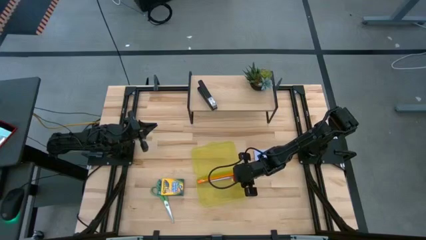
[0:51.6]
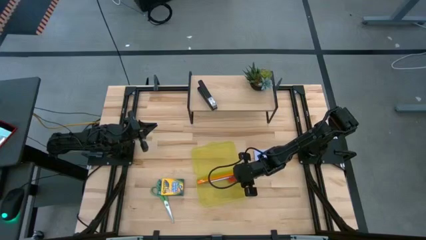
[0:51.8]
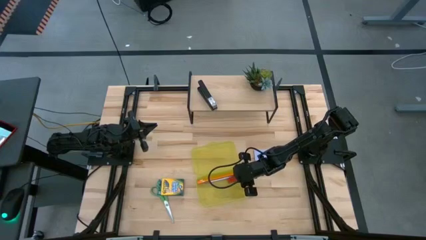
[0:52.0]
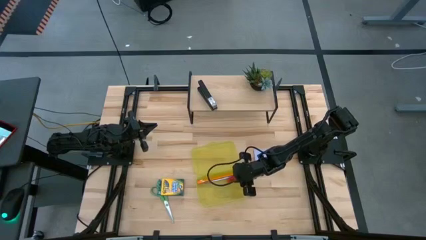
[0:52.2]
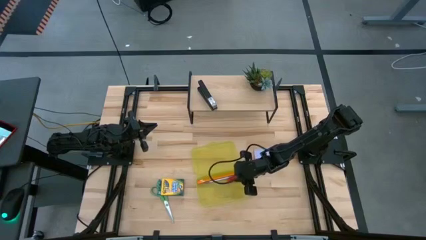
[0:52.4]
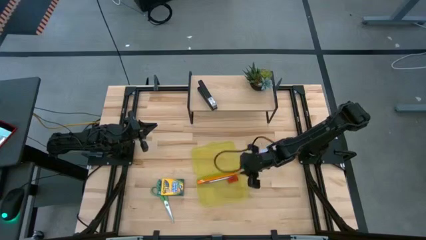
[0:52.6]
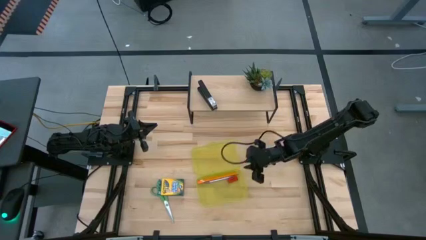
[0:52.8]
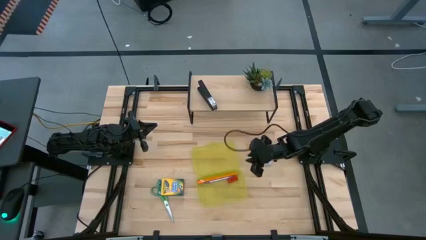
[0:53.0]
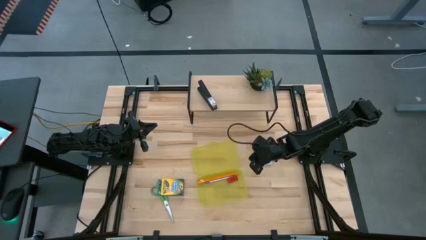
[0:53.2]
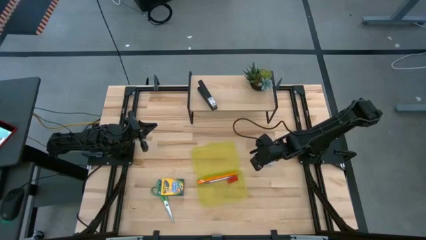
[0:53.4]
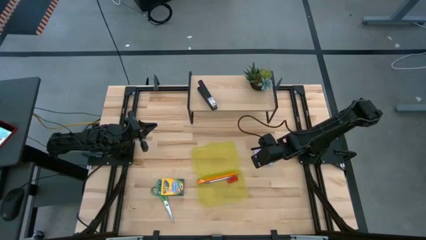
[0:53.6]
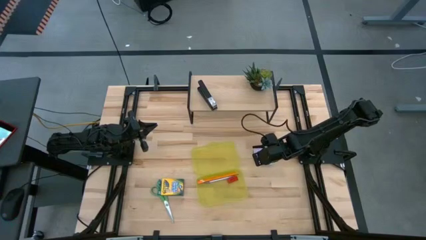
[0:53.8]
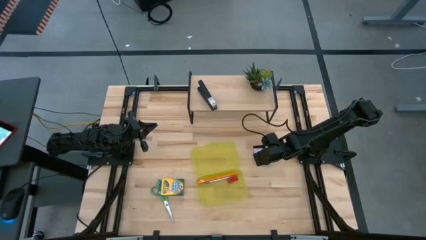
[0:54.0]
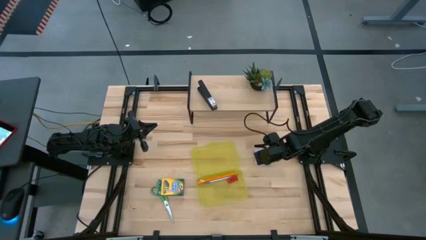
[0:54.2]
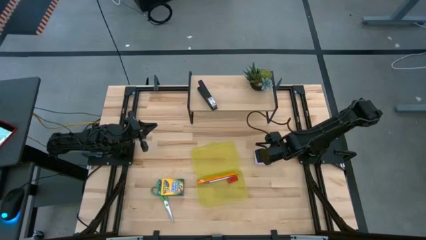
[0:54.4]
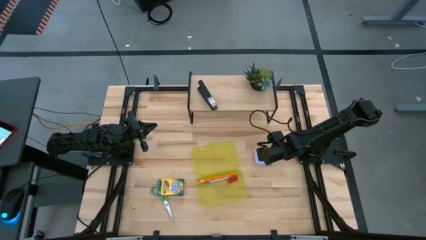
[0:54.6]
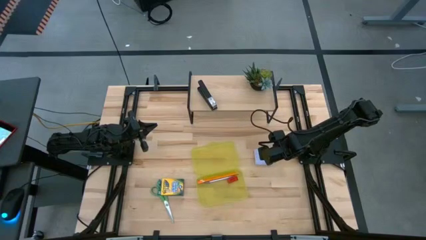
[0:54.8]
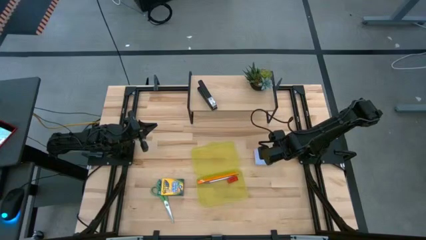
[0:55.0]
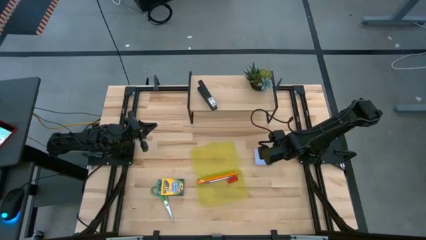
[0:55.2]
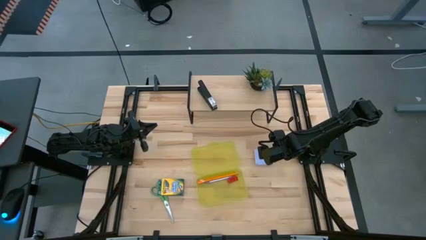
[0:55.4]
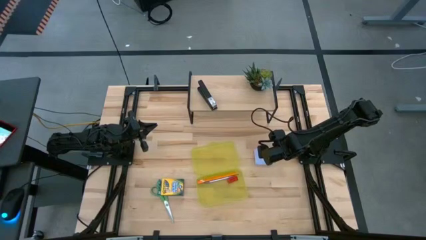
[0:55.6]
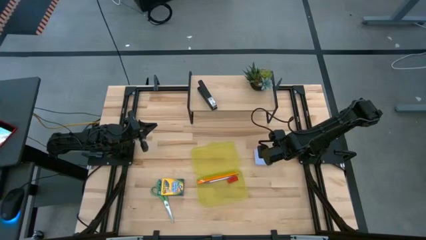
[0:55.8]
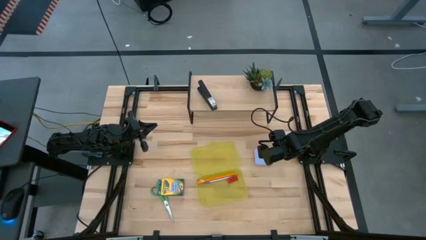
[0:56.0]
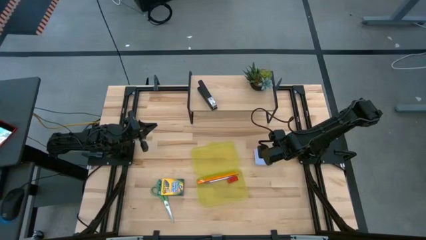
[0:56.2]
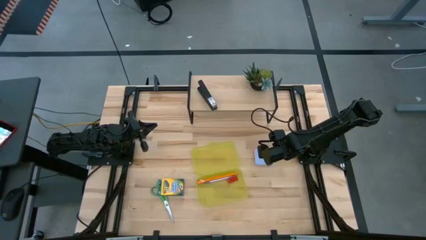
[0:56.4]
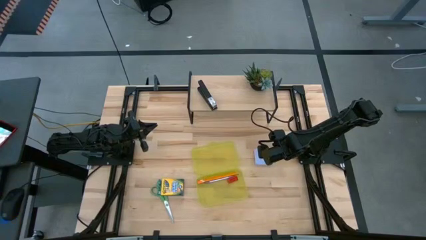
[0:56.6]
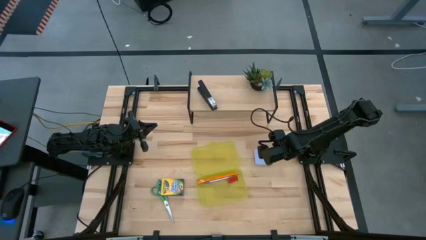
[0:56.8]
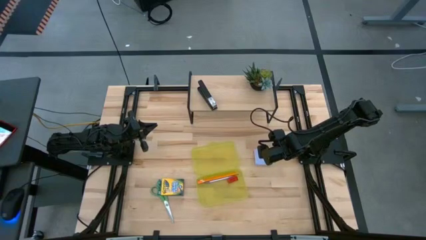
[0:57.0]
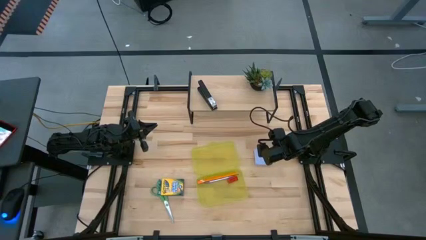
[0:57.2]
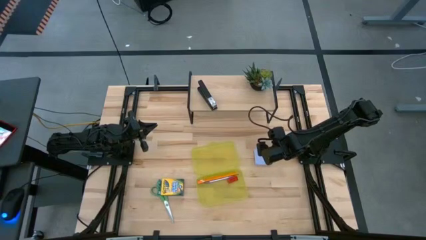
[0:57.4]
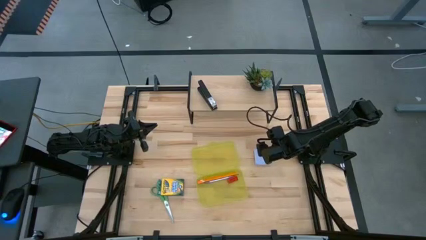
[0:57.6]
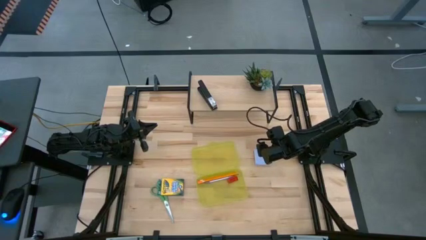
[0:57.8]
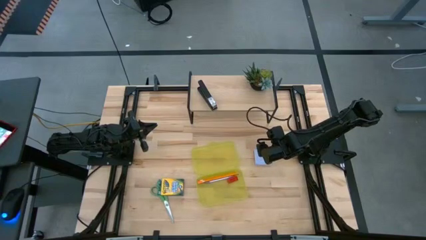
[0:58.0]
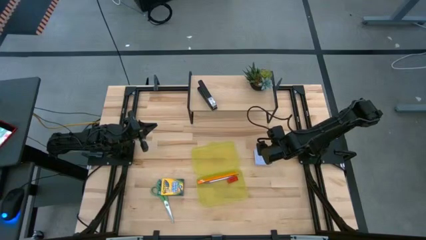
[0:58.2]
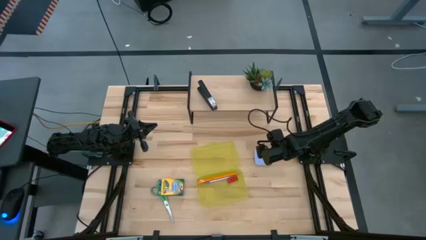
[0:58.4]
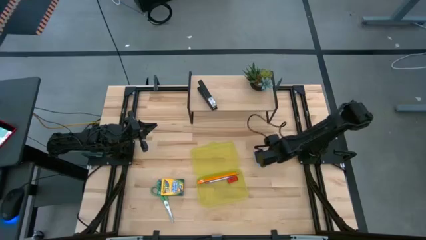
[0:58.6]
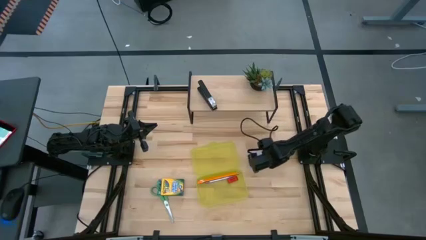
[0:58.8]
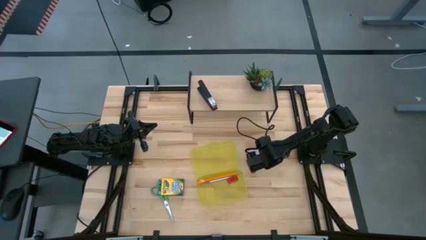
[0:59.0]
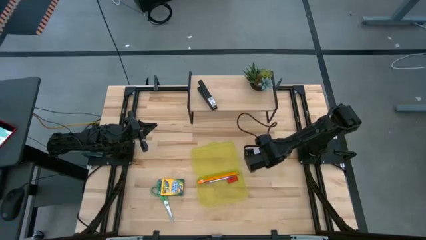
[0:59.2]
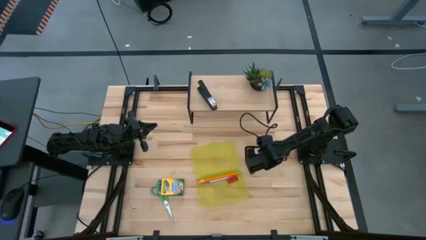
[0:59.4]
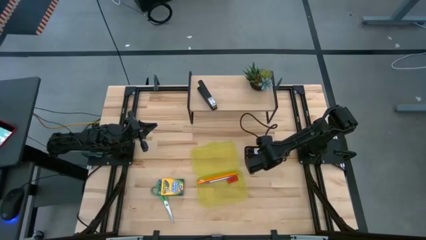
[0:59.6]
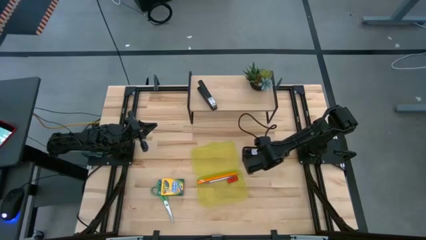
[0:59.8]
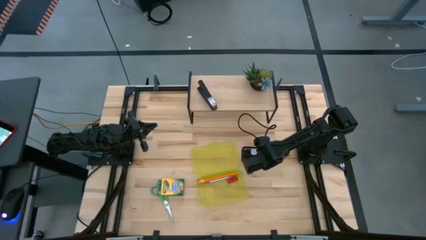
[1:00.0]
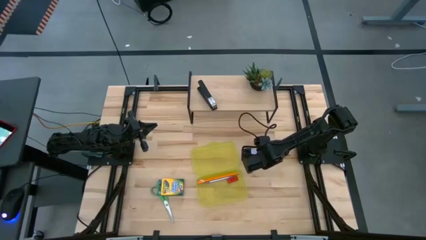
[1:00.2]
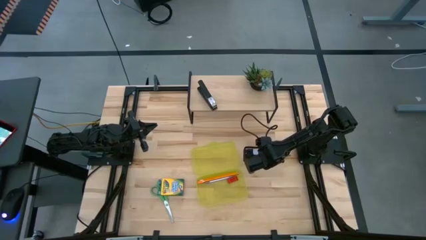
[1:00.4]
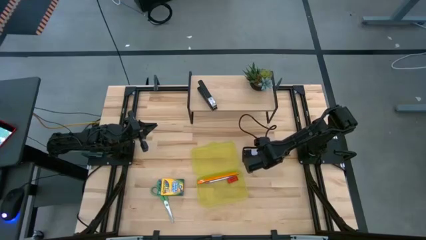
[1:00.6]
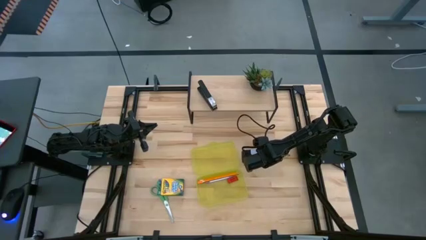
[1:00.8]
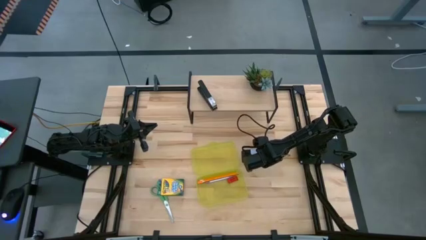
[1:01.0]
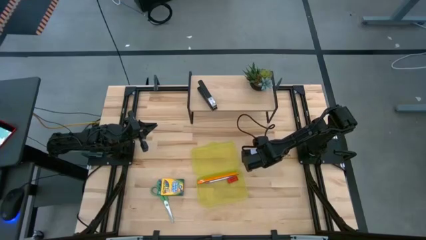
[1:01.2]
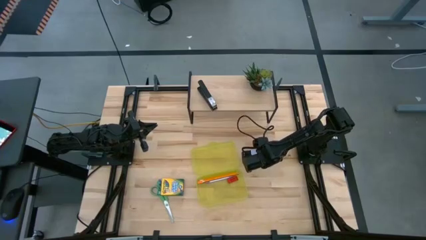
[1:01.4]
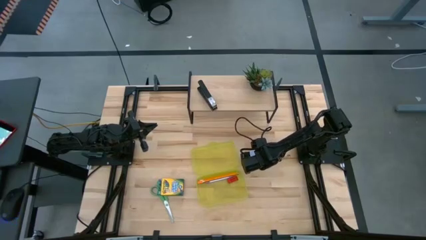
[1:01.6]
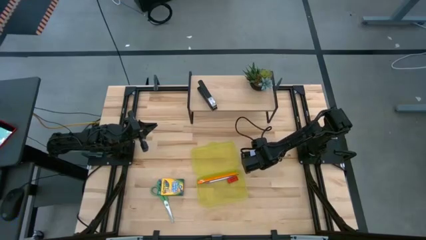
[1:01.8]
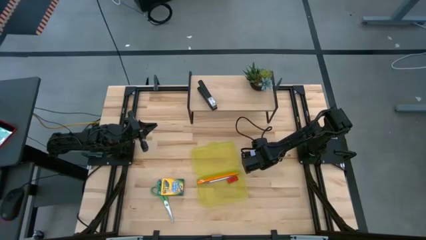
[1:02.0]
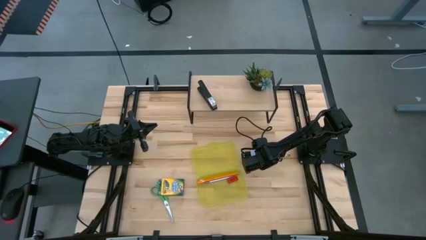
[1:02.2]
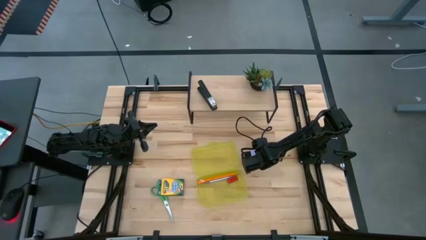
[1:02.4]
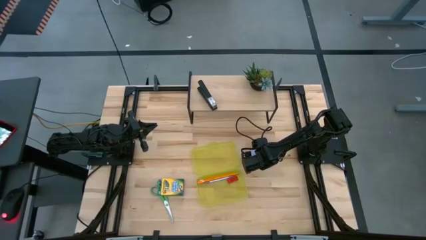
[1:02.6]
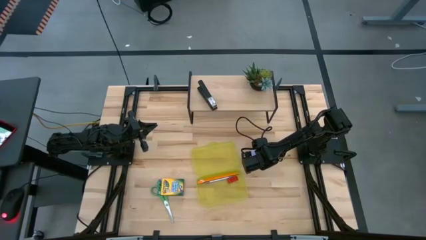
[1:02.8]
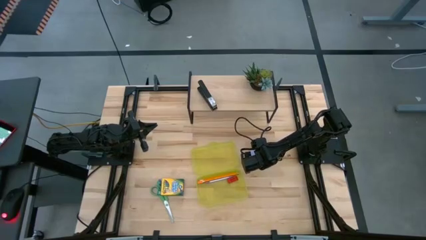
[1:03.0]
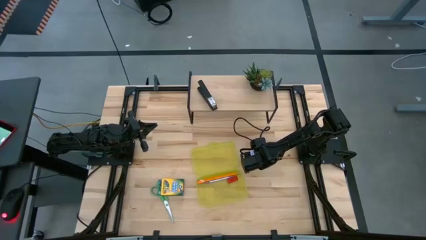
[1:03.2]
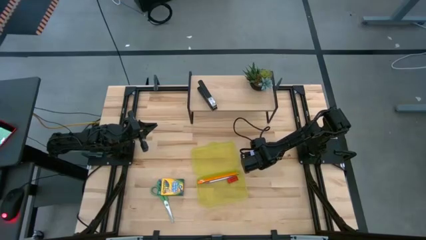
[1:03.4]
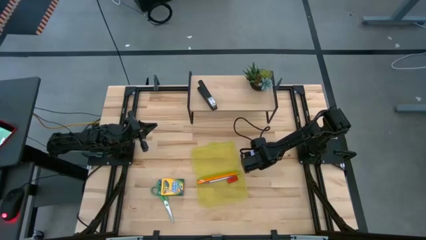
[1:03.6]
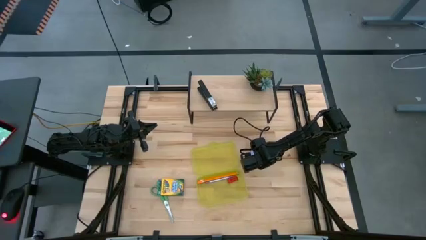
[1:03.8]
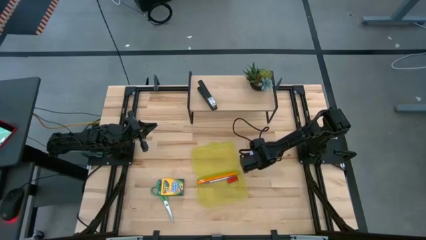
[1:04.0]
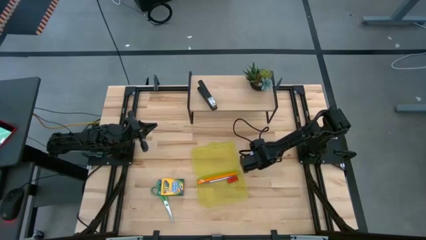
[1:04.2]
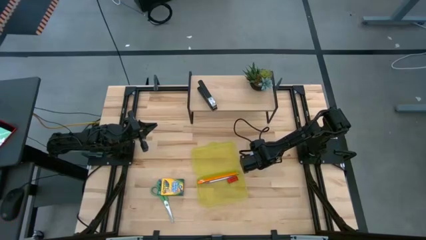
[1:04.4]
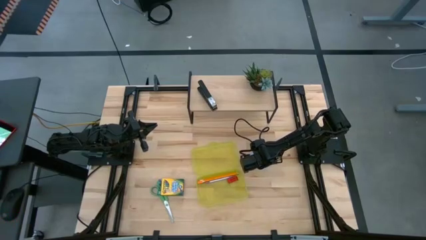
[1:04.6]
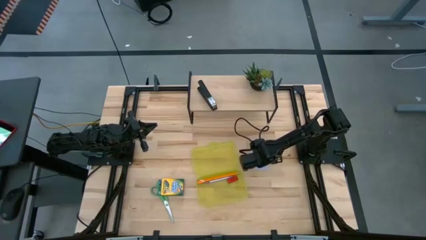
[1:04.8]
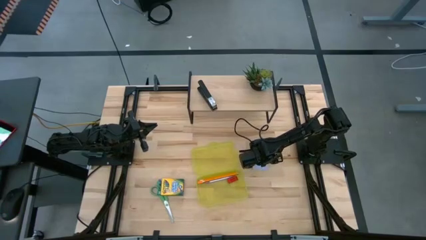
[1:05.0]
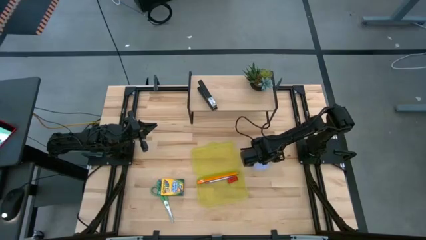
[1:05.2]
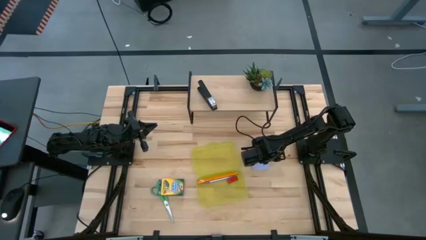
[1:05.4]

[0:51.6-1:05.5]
Task: Pack school essentials
Put the white sticky note into the yellow supply box
